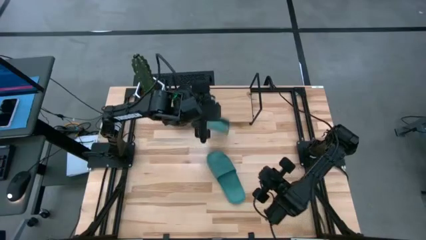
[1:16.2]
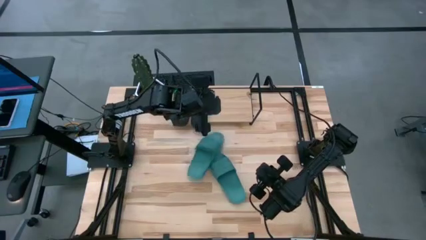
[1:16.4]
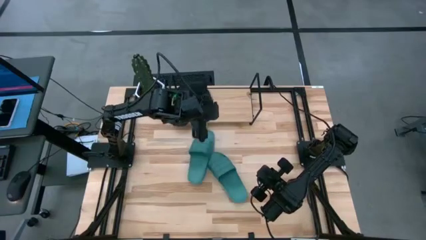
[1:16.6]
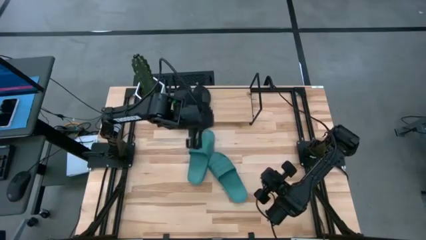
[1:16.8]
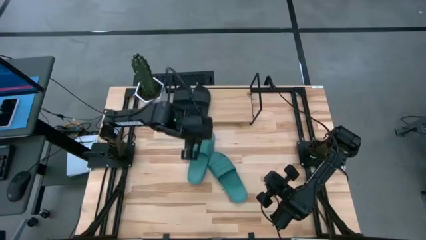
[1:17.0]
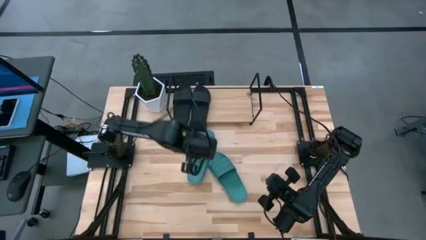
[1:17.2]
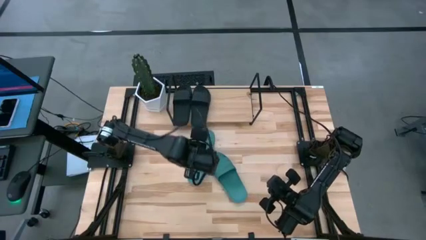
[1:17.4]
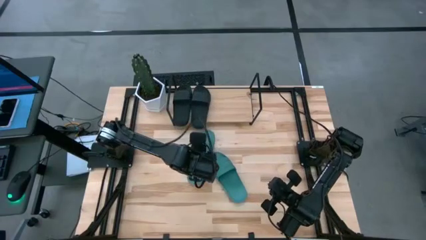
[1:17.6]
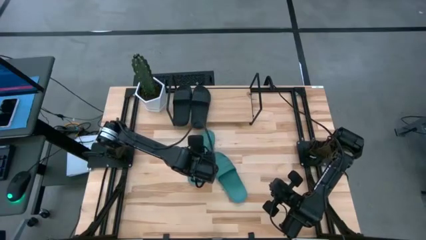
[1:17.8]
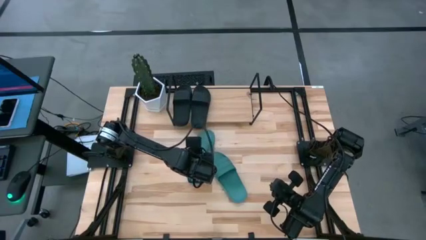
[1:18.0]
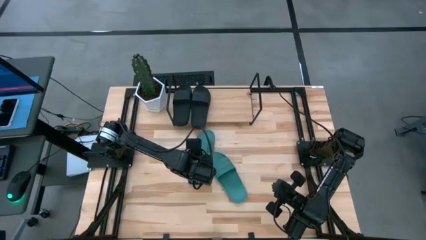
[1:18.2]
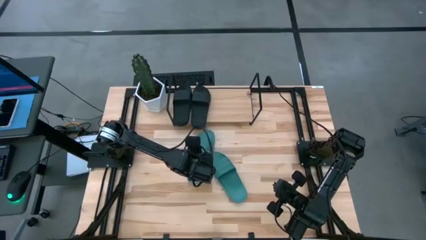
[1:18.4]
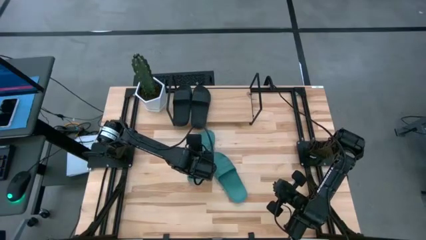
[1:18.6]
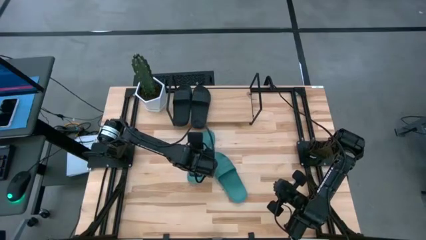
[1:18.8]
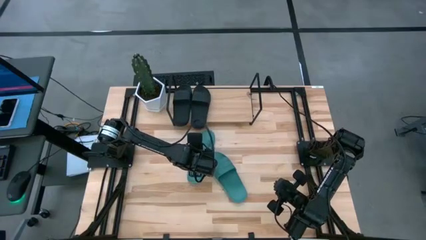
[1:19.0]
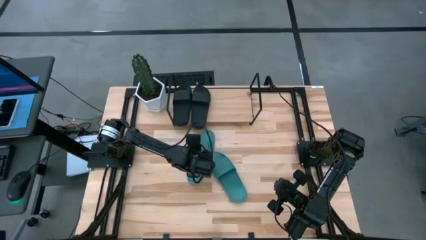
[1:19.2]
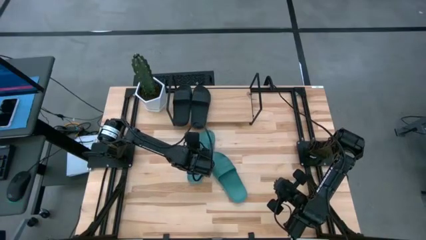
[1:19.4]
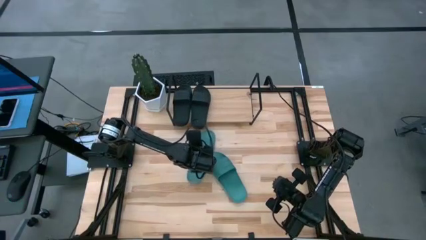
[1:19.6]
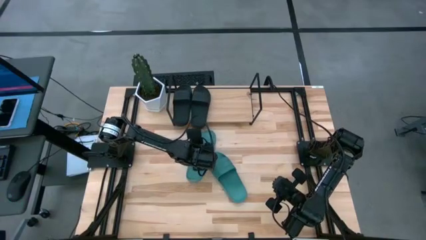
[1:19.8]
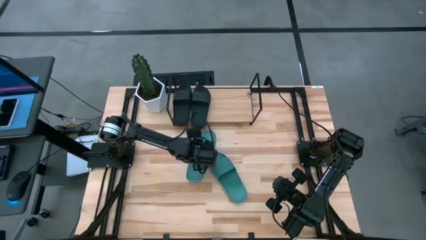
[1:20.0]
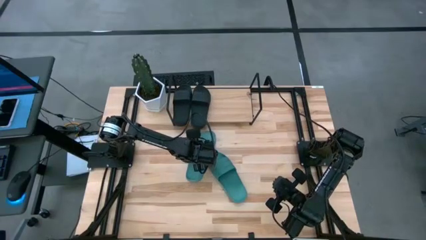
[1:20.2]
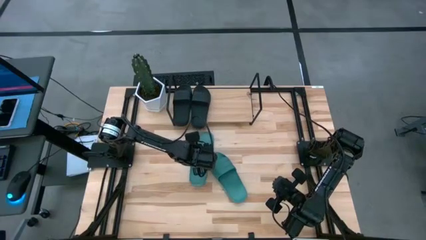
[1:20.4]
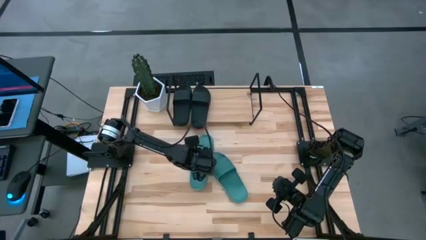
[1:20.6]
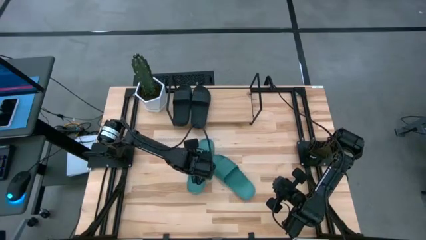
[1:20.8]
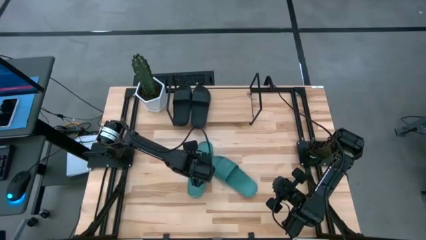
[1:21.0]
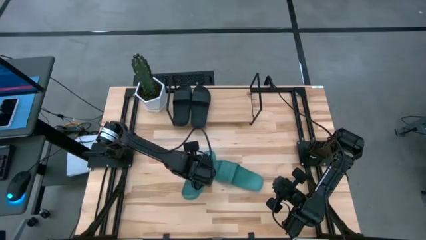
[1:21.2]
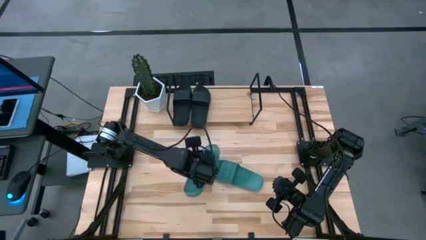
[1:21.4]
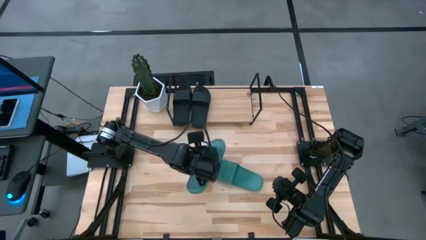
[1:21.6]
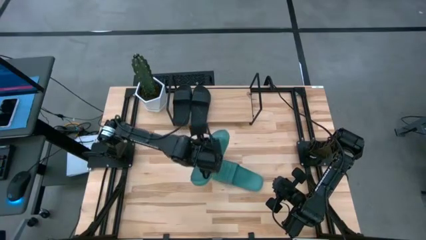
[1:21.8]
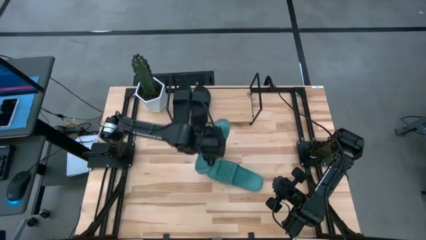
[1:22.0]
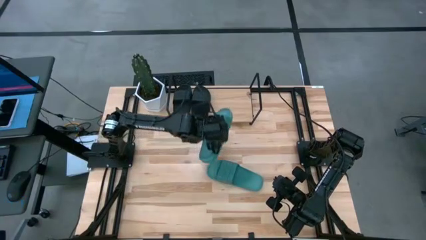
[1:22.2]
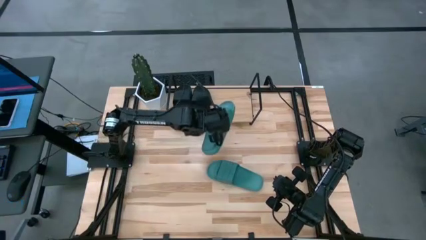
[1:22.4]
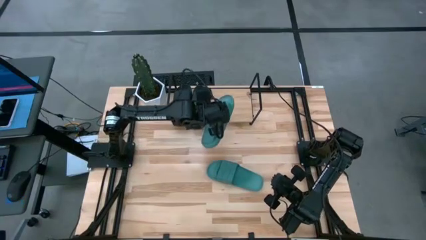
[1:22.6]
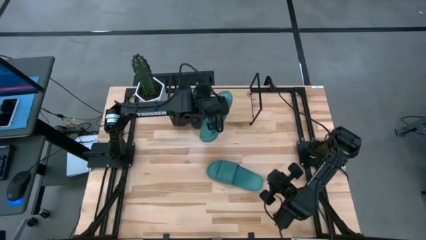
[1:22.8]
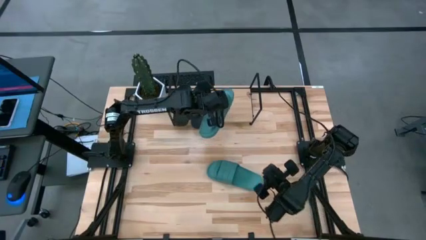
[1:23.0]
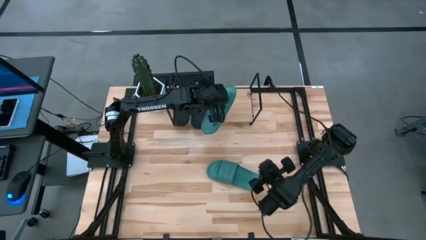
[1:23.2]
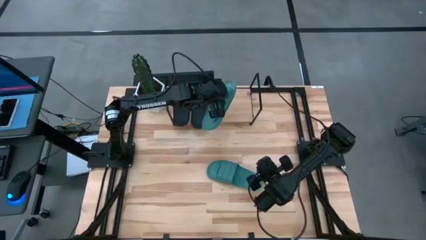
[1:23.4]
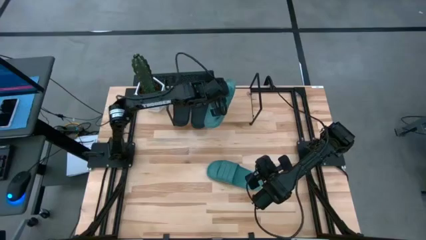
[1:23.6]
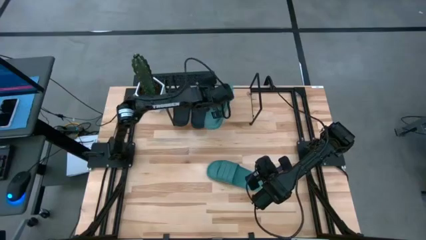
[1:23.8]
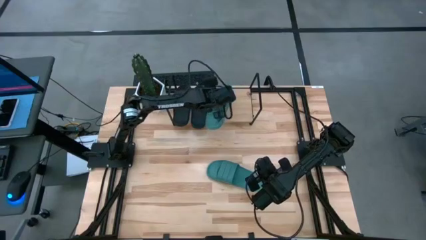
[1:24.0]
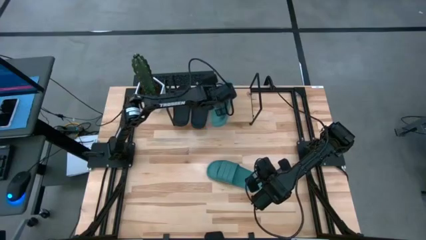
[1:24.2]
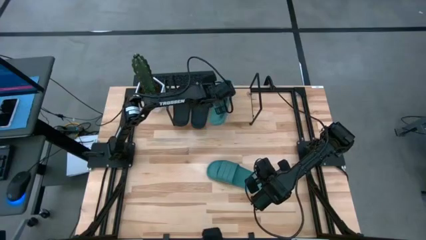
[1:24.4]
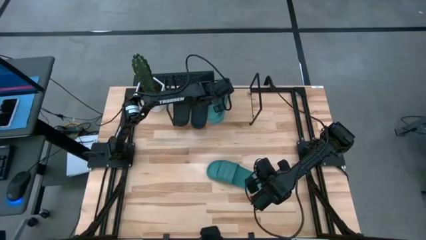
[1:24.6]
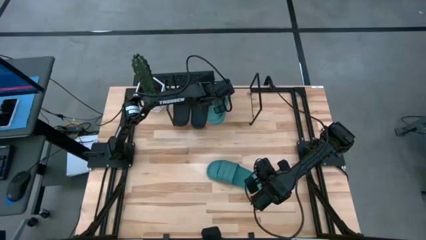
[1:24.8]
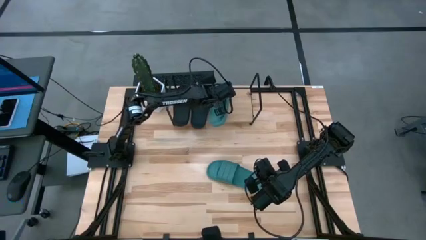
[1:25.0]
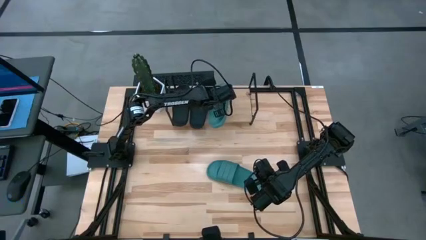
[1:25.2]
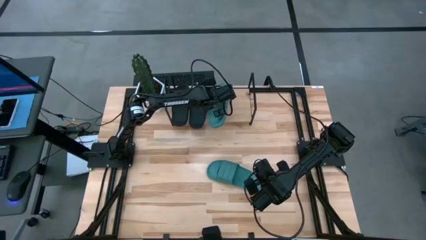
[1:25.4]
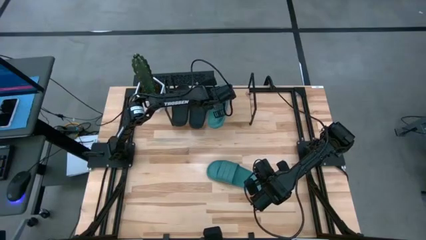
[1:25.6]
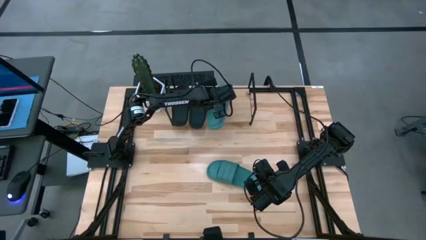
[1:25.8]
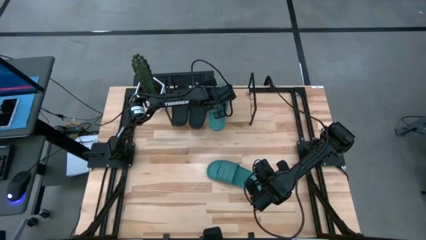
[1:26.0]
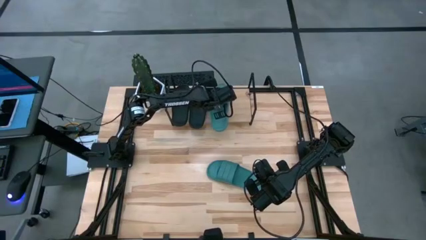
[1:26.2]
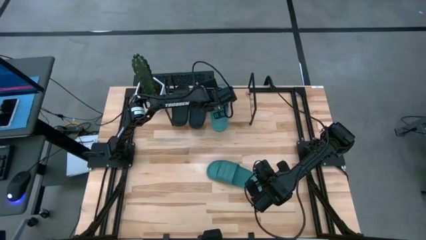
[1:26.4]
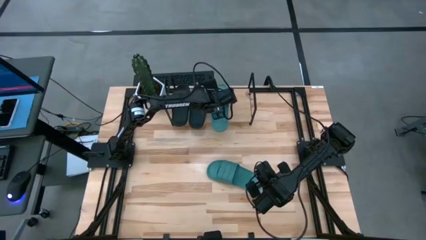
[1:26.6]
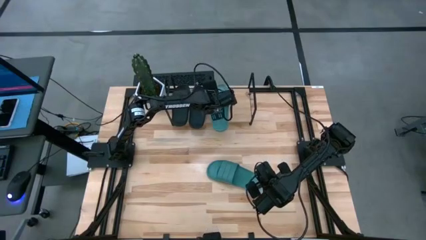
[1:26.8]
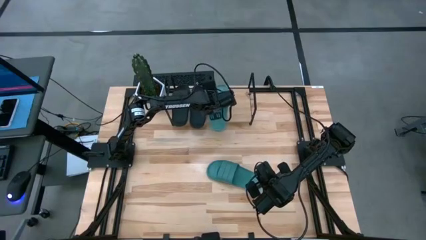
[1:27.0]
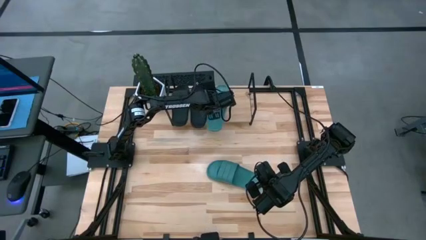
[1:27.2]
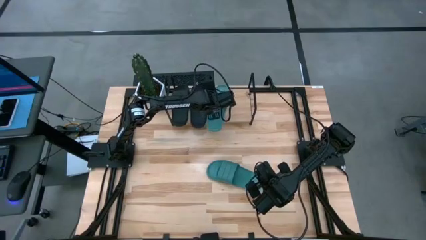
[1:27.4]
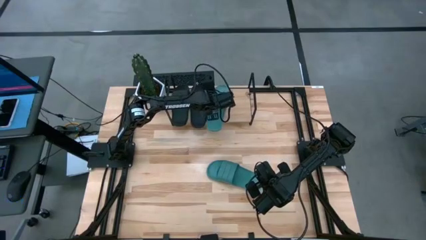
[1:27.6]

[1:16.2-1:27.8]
Task: Pick and place slides into the shelf
Put the left green slides on the shelf
